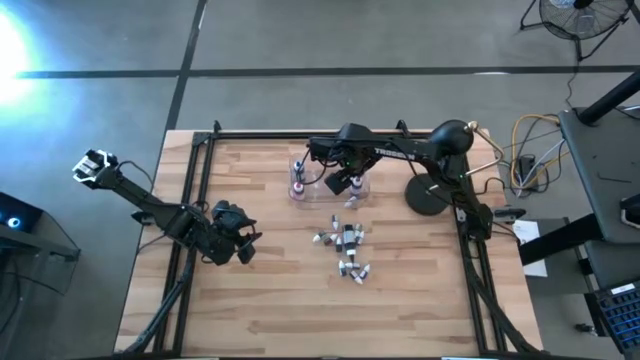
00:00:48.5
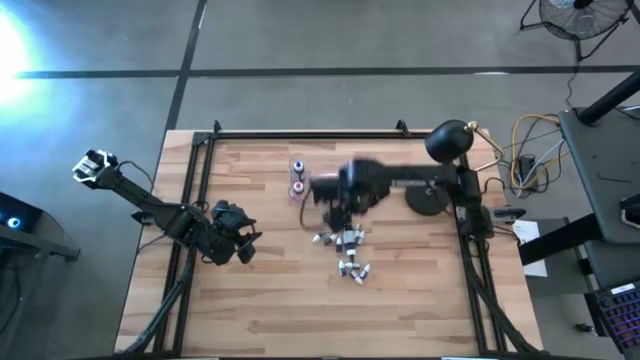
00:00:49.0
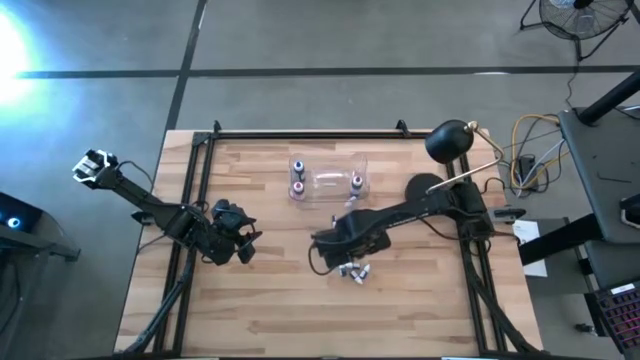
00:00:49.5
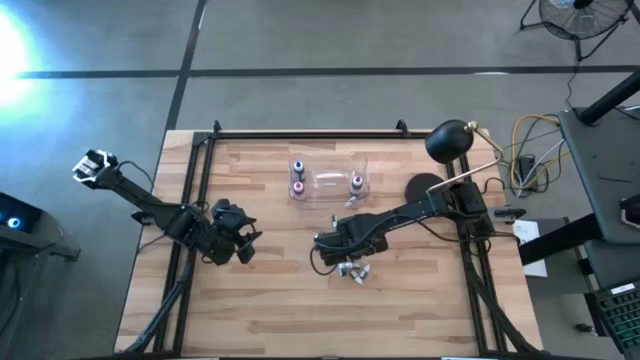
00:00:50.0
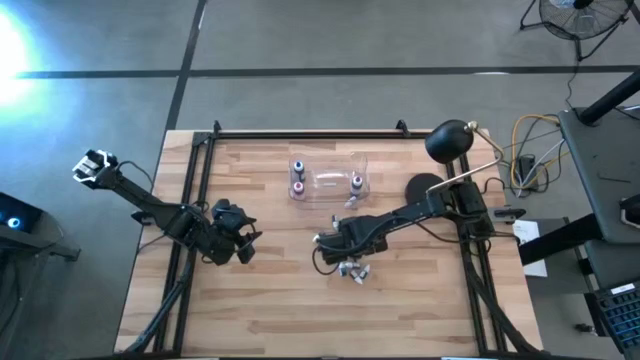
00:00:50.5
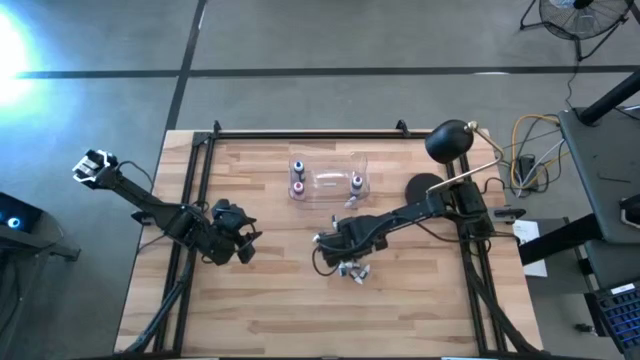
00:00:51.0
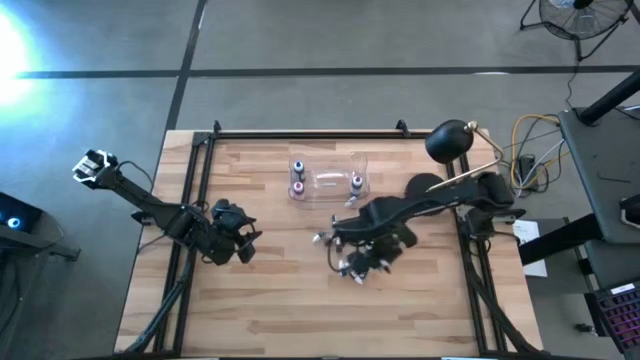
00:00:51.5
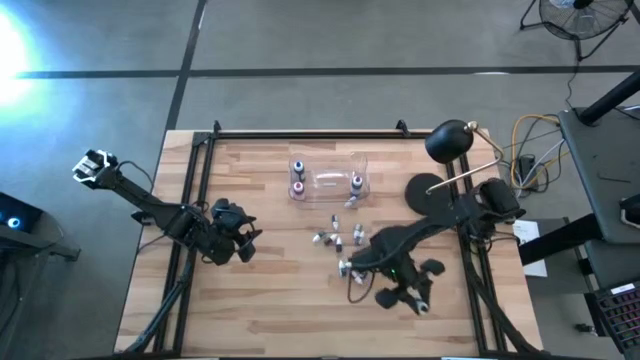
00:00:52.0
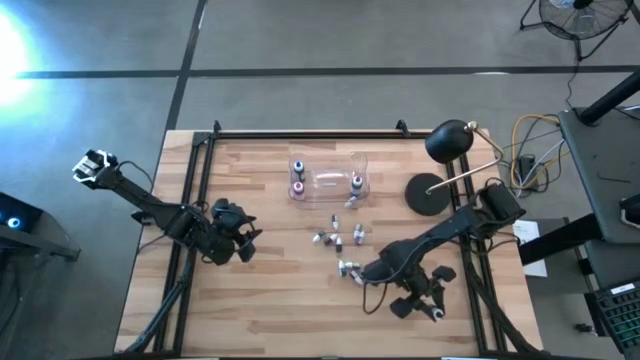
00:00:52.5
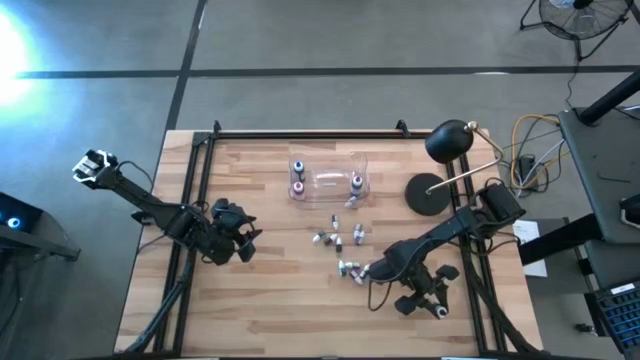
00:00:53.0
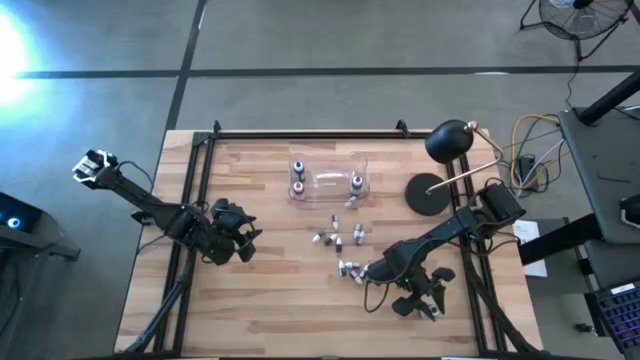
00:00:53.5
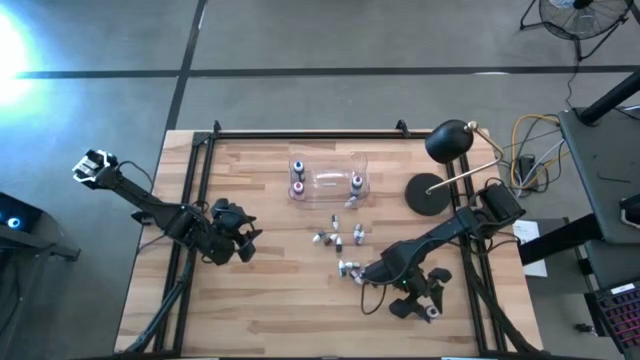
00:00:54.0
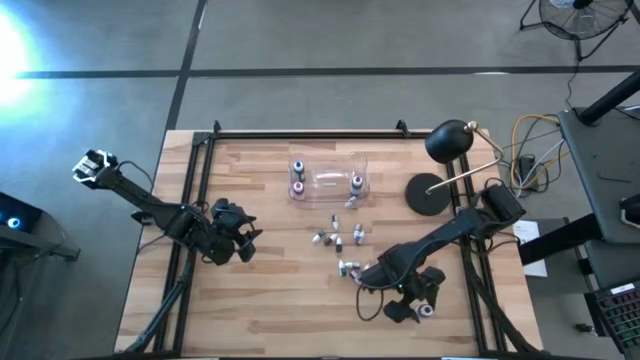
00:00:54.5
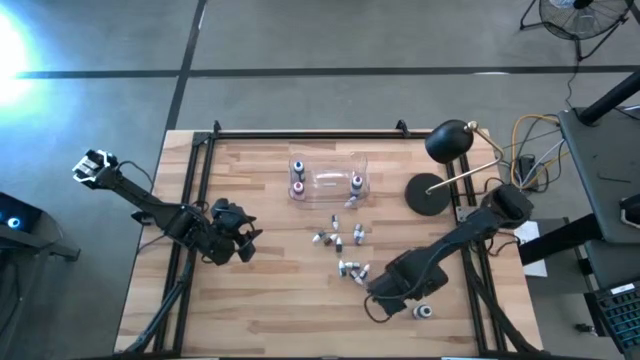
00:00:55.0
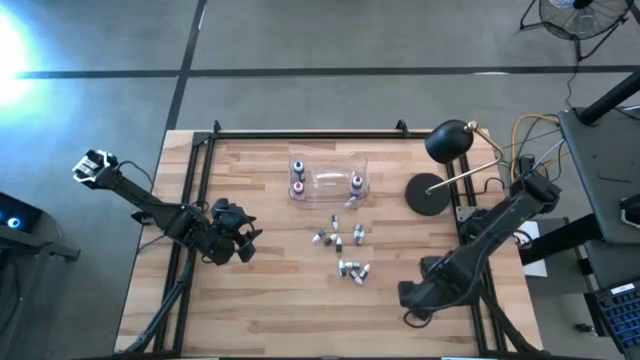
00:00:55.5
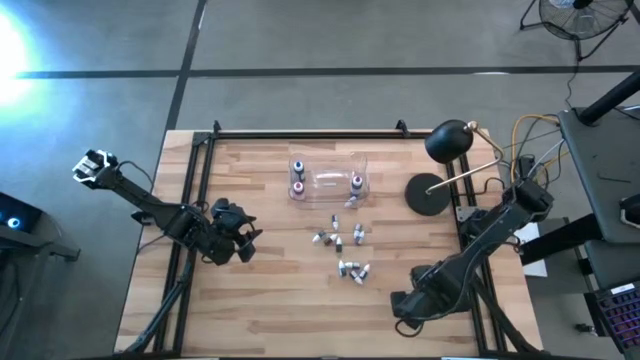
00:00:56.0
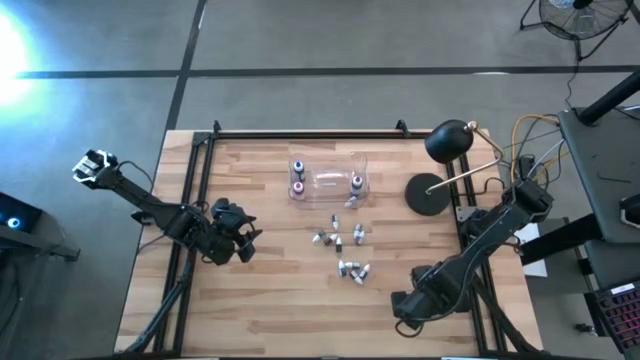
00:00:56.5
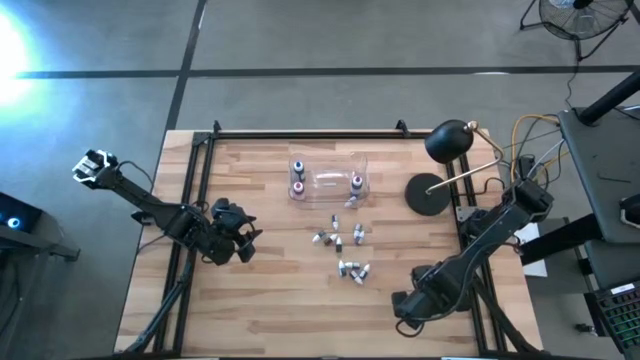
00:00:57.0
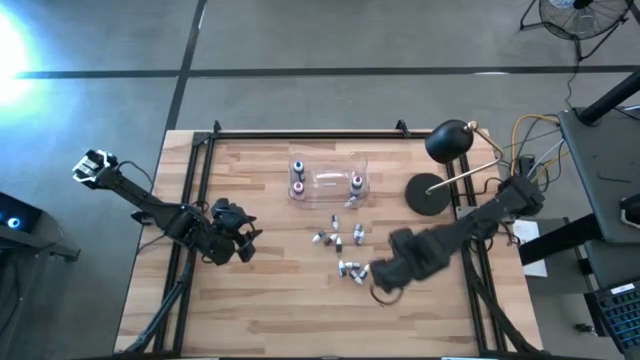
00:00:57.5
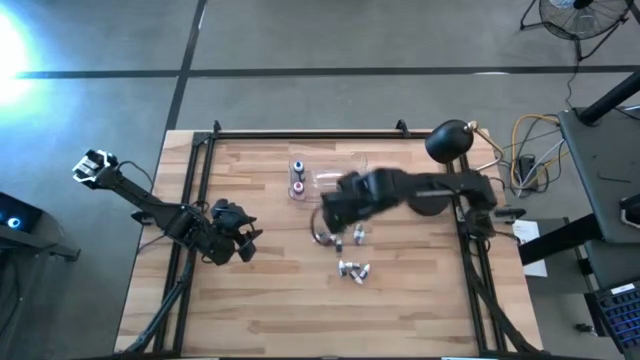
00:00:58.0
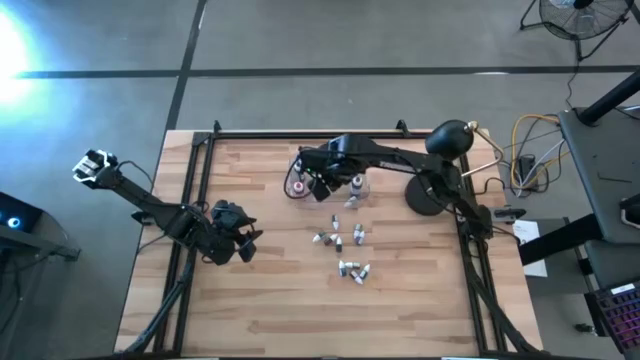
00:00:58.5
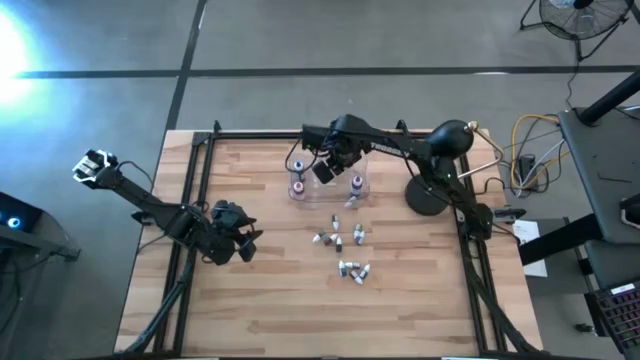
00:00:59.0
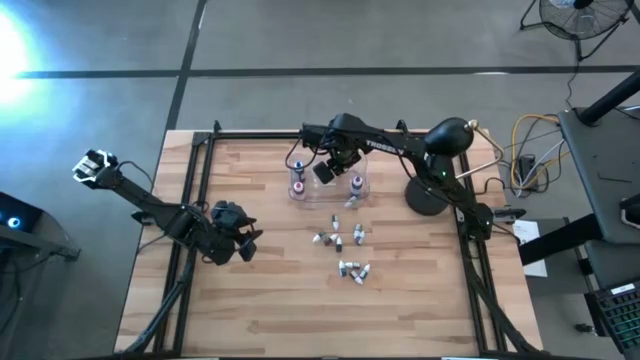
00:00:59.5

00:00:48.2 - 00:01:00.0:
Task: Pick & Place food coloring
Put the large black food coloring bottle into the transparent bin
